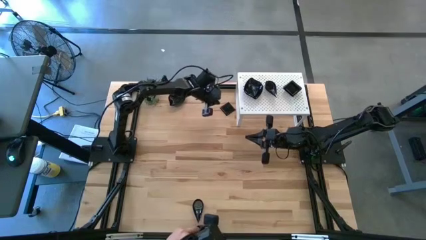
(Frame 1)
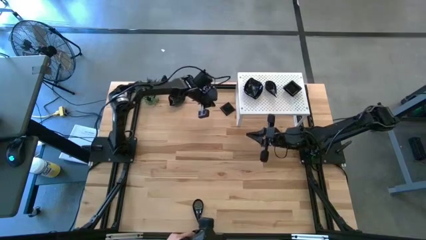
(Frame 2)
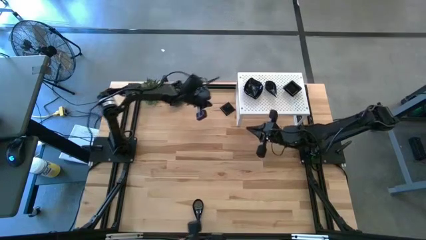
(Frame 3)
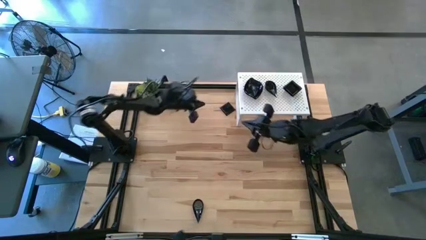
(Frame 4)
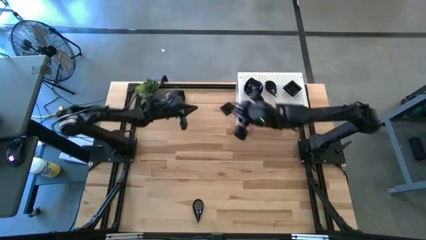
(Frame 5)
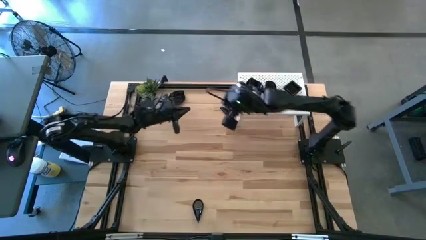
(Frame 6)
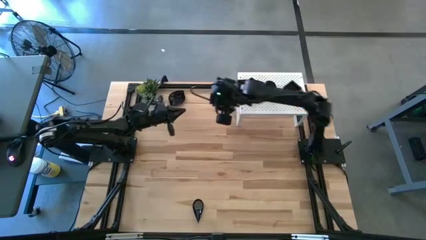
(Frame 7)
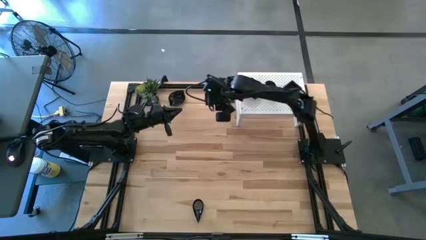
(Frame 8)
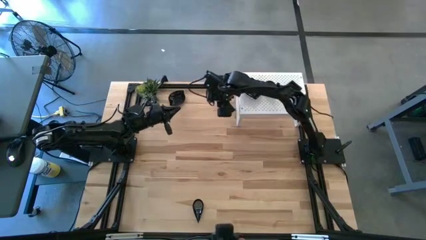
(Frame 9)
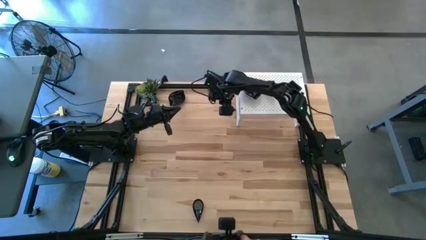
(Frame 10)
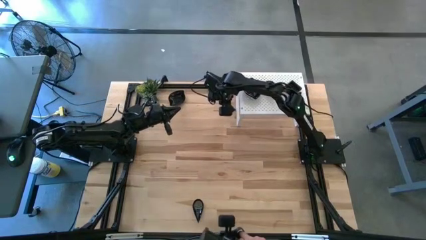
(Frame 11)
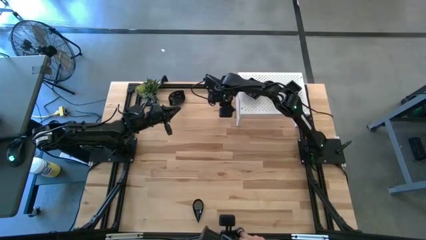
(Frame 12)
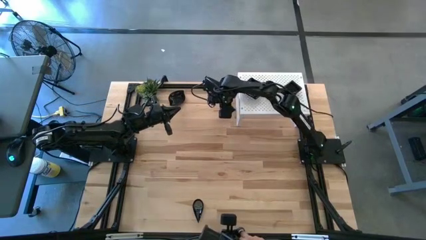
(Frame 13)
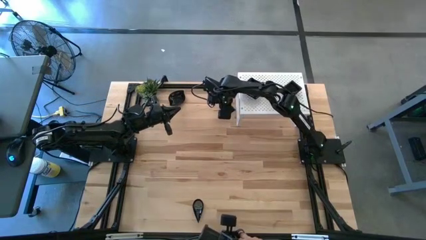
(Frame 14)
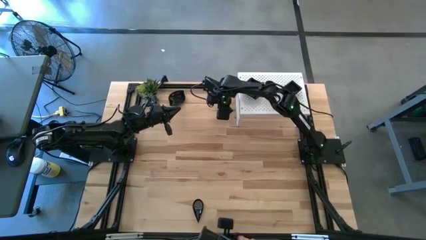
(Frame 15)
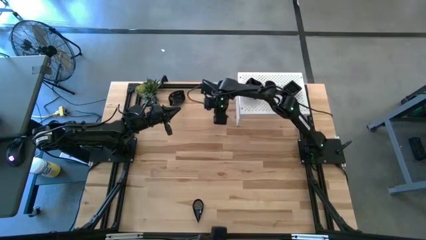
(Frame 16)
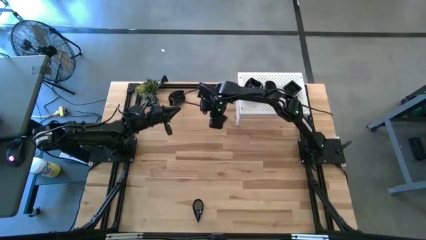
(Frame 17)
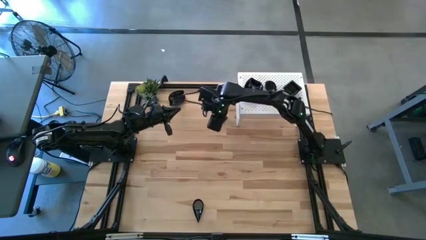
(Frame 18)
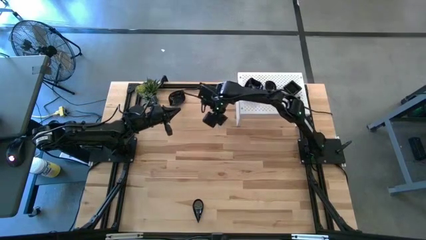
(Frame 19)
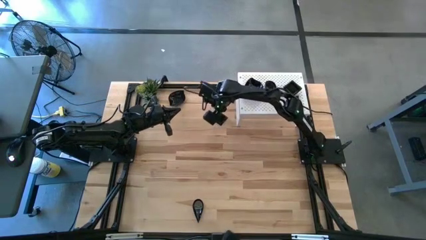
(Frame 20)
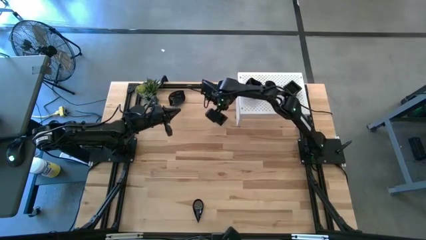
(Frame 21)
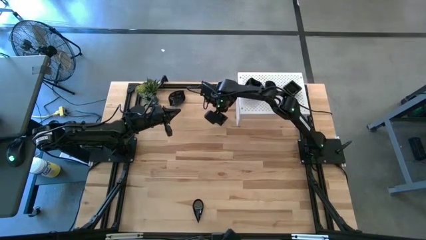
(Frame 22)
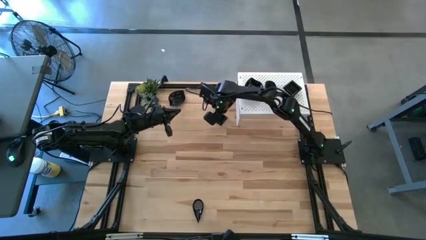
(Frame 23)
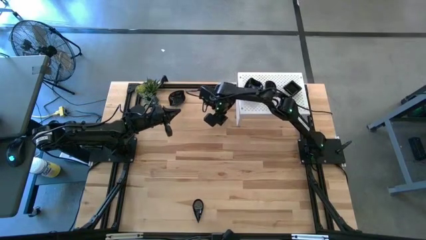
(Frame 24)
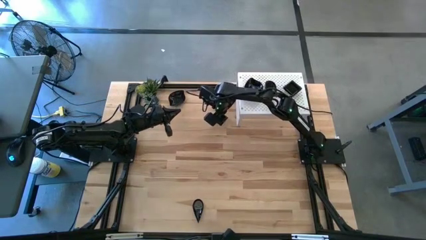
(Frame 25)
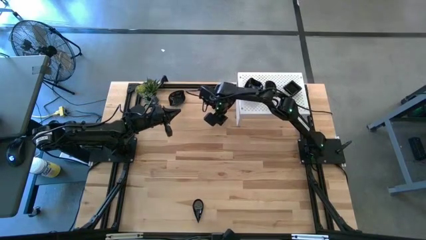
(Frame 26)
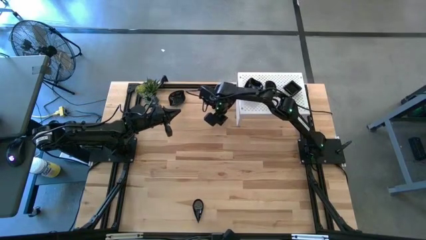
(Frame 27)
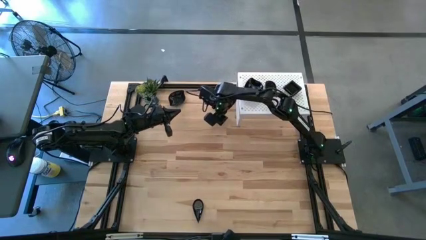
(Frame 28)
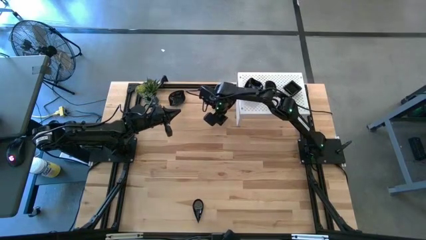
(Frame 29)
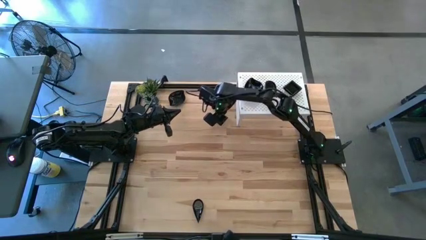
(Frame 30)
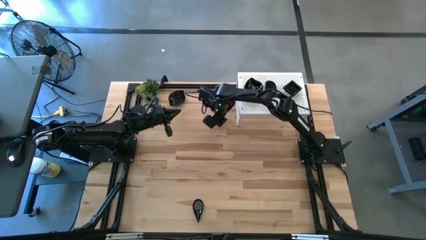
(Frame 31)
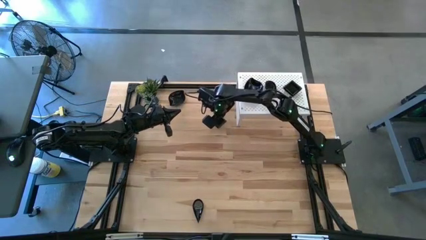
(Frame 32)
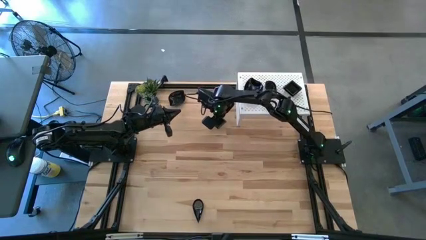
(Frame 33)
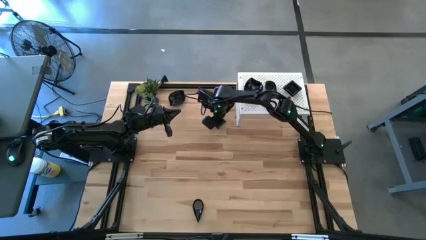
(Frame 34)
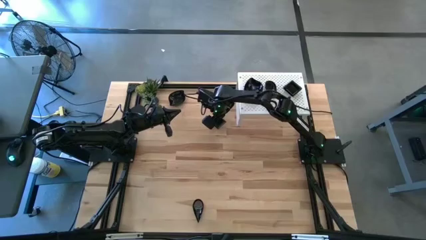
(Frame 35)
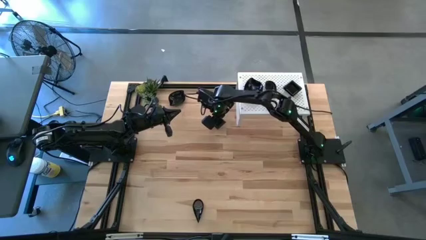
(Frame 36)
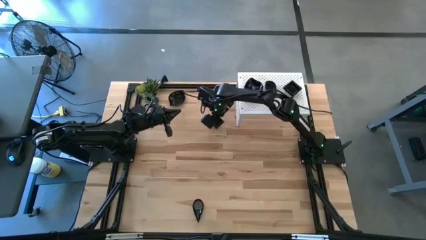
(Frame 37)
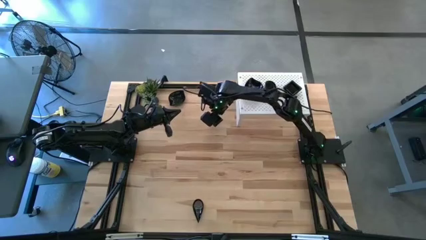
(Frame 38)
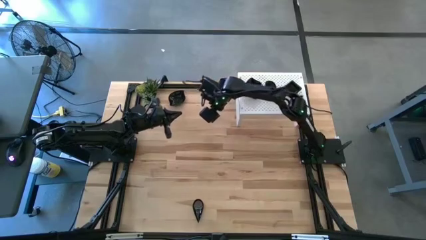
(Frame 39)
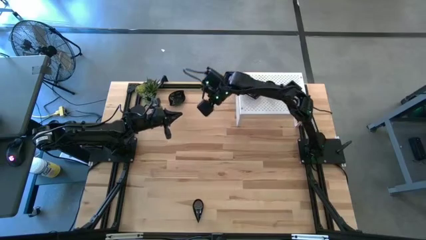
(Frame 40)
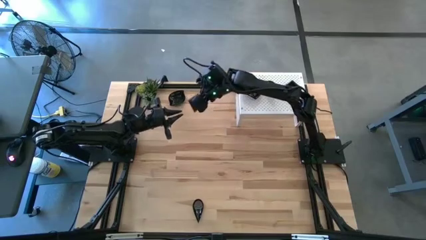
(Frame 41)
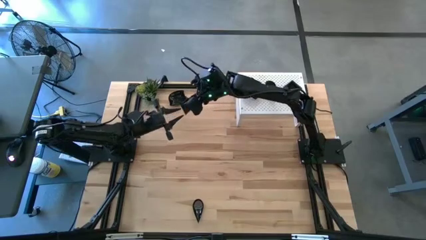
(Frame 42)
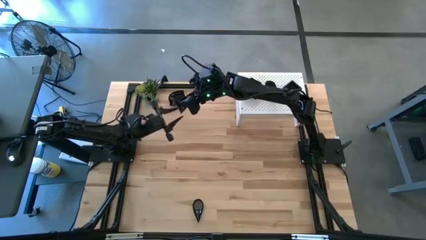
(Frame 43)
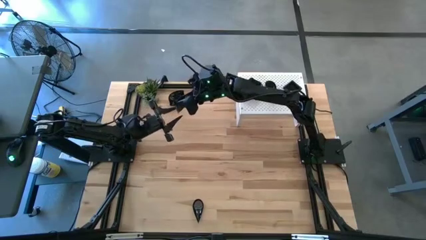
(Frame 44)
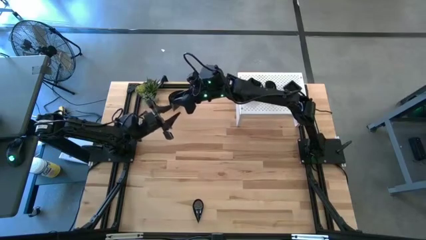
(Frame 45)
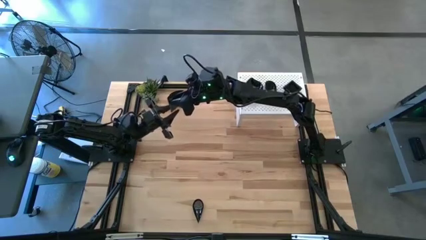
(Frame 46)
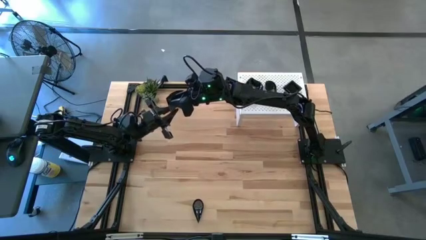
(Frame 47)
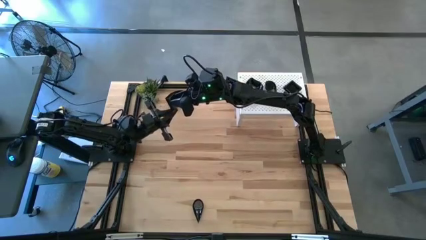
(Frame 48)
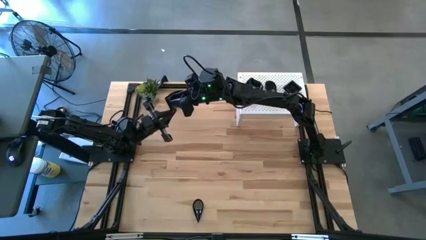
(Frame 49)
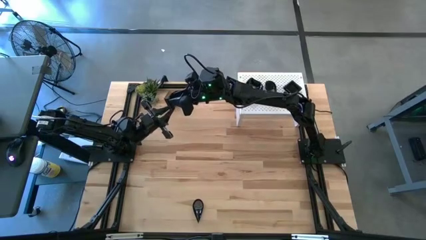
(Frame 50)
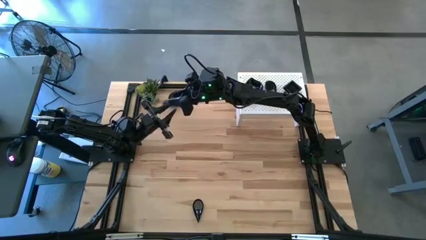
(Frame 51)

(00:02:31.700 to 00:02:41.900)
Task: Pick & Place Mini shaped plates
Stack the black square plate on top of the black square plates on the shelf

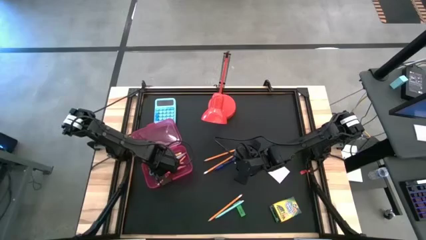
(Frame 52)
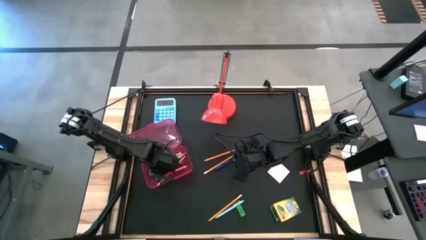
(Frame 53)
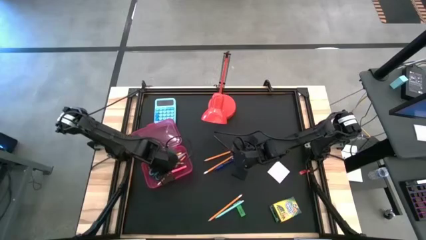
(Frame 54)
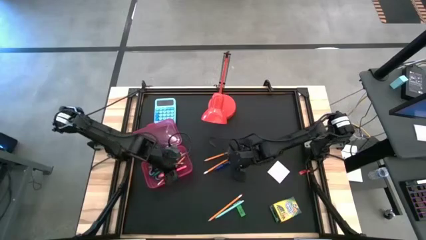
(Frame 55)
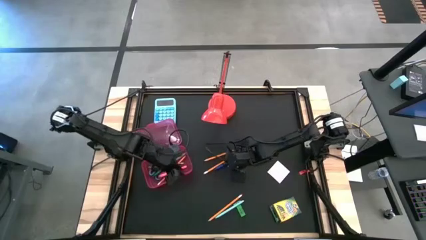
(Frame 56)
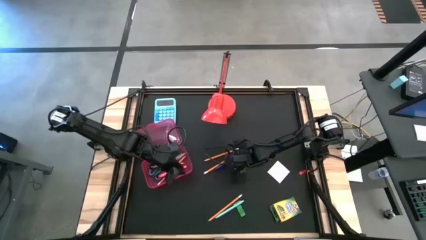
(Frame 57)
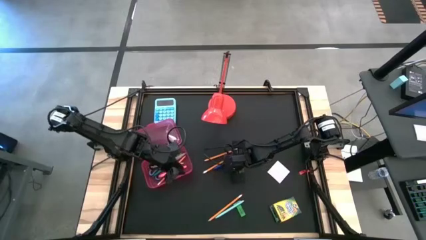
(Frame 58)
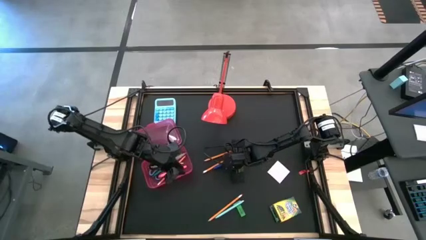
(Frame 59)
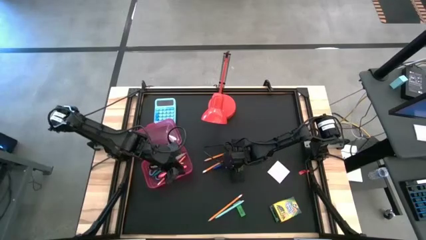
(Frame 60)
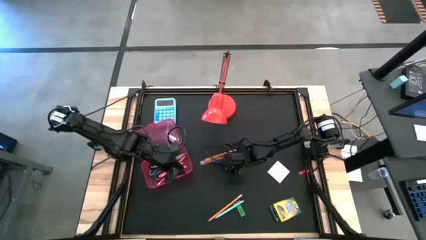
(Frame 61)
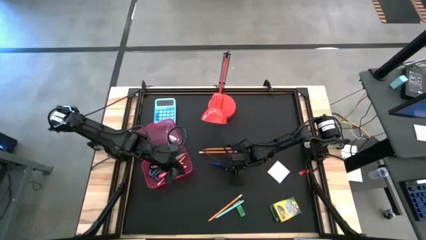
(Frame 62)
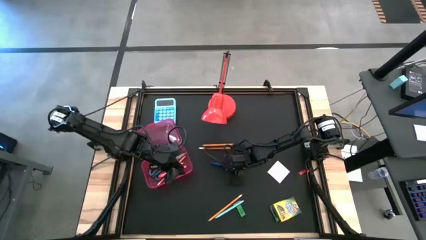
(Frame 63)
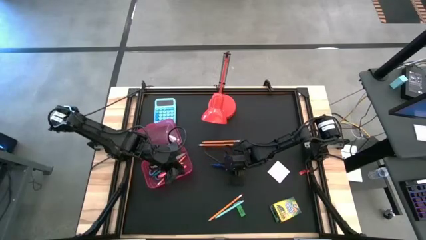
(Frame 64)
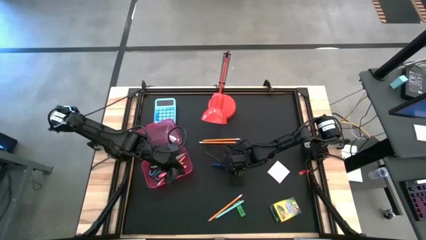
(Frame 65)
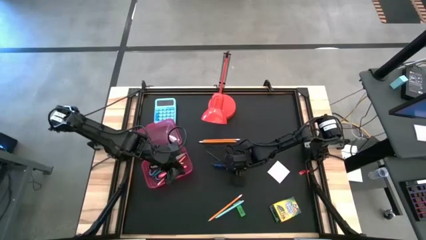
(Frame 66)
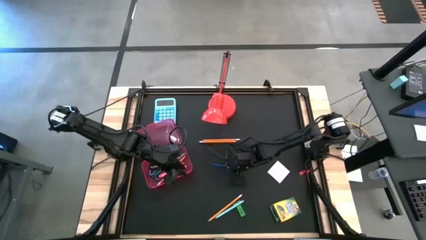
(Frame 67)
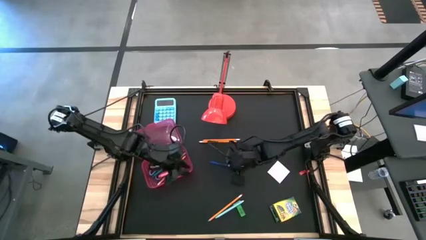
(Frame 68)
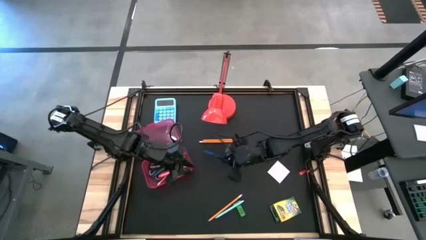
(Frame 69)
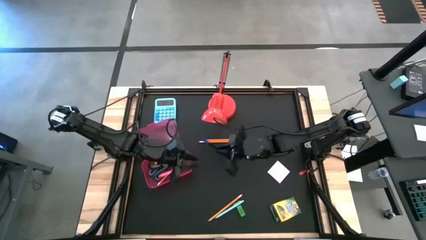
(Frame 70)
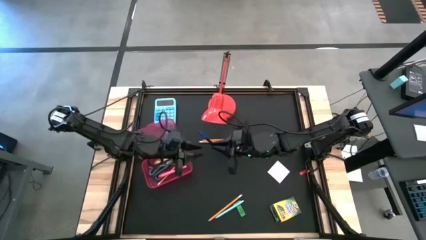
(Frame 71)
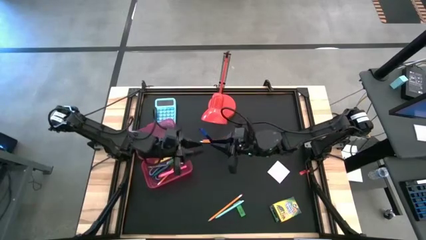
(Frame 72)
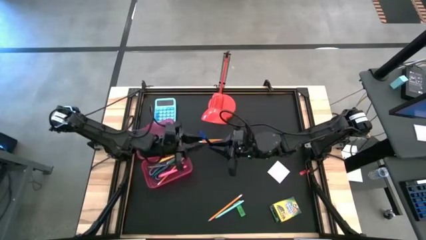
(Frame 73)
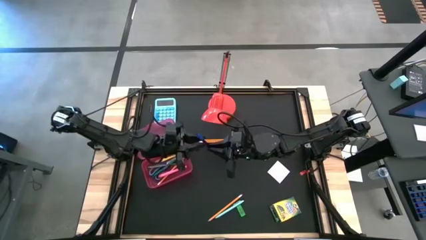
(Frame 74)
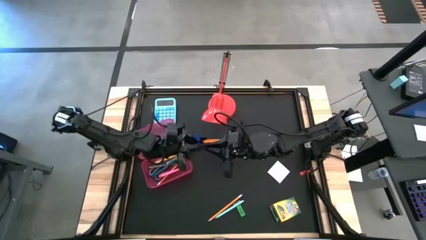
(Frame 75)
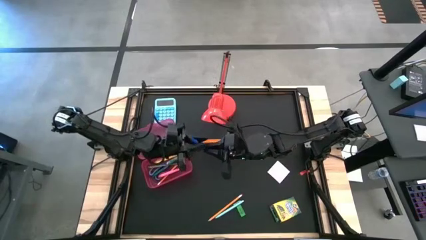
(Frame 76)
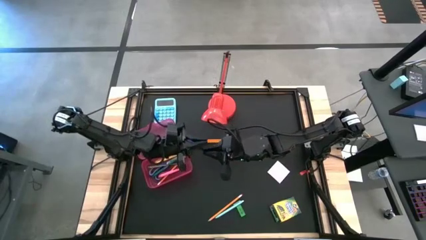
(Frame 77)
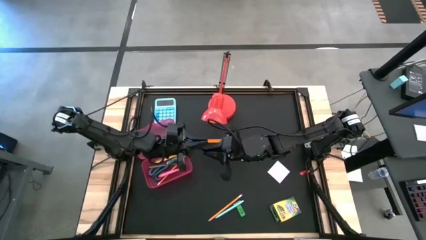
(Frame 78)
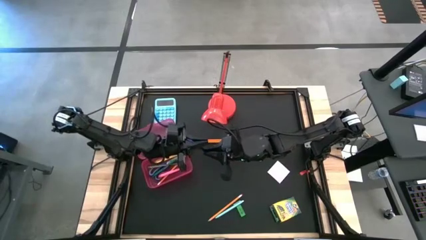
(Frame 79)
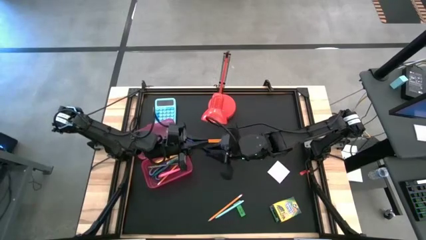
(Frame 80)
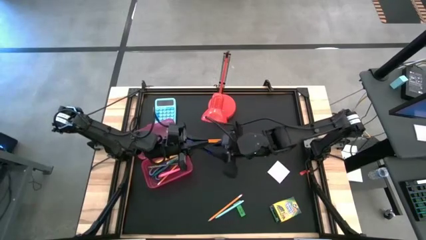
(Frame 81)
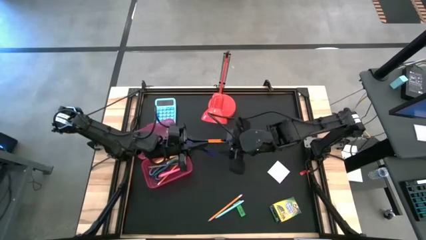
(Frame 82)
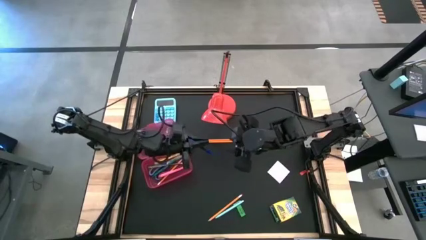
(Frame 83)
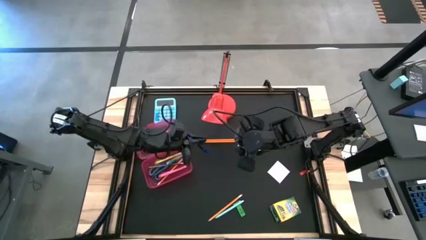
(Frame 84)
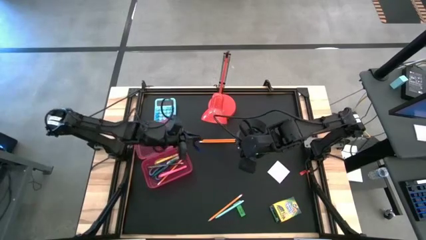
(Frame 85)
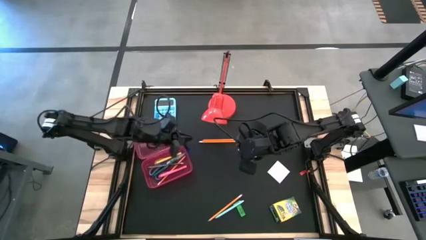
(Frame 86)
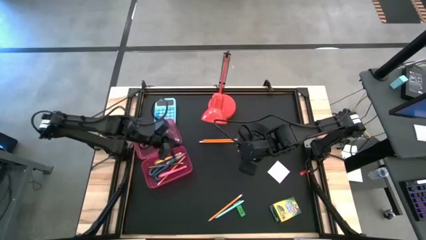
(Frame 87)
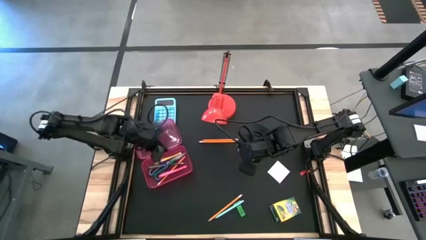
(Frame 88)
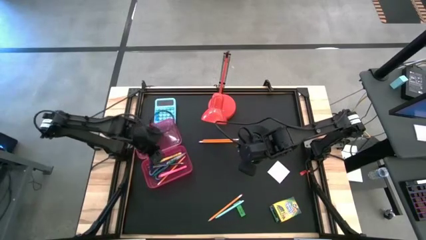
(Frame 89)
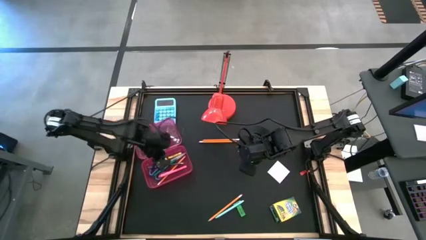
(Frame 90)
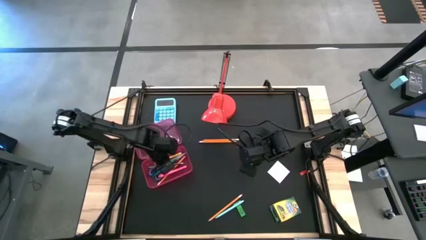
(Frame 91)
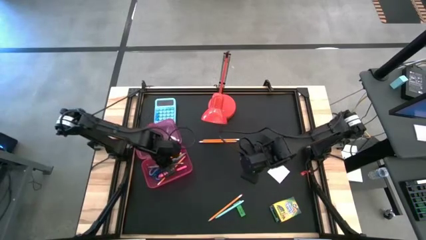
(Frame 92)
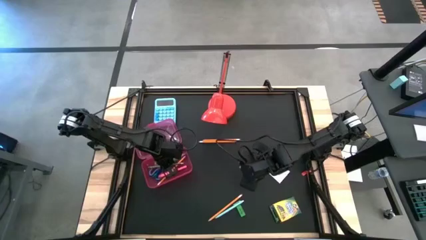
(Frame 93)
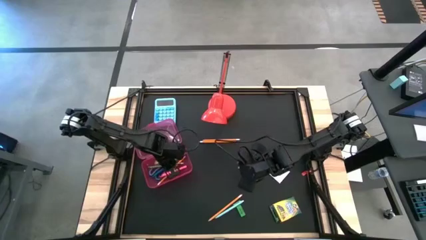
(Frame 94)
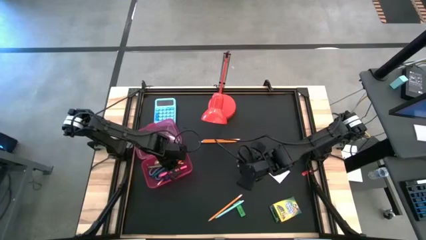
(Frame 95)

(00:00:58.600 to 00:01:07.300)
Task: Pack school essentials
Put the blue pen into the red supply box
